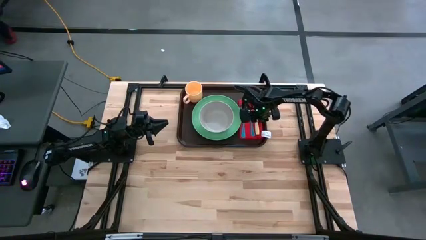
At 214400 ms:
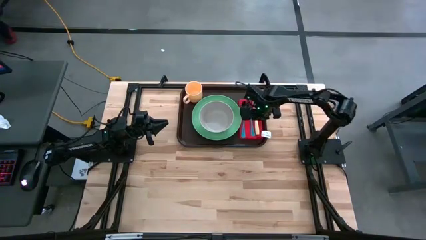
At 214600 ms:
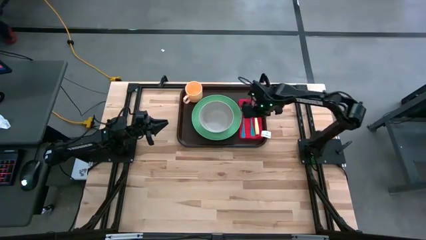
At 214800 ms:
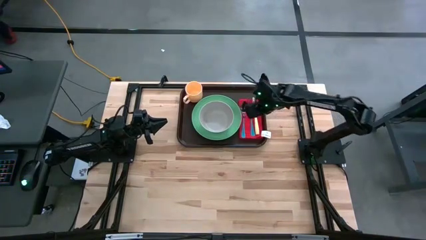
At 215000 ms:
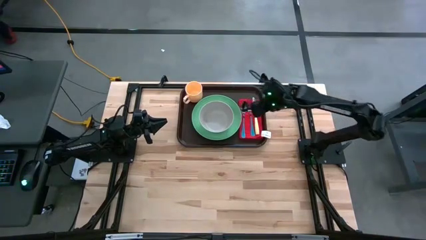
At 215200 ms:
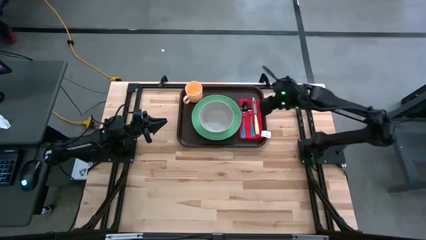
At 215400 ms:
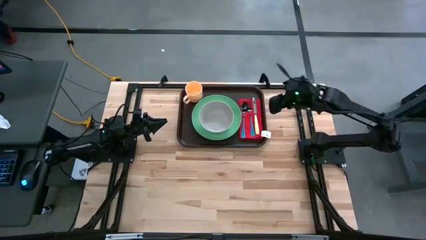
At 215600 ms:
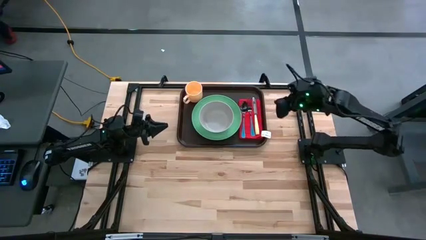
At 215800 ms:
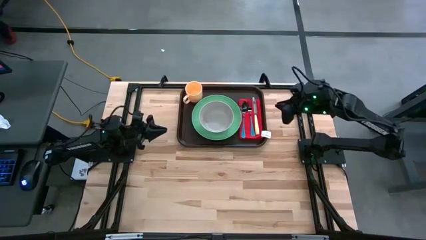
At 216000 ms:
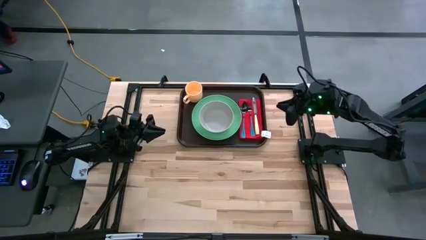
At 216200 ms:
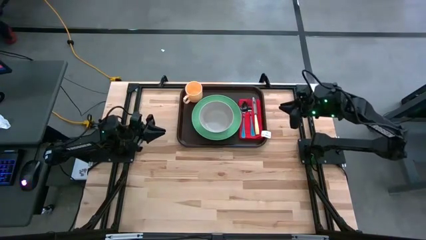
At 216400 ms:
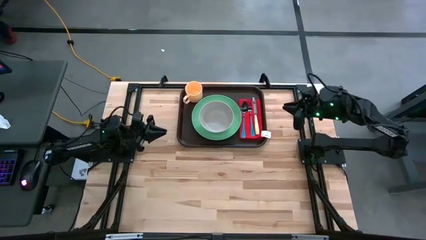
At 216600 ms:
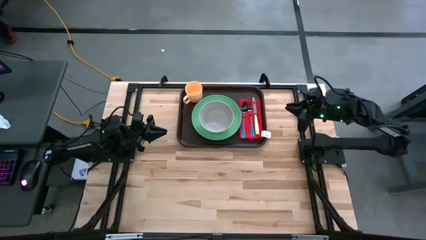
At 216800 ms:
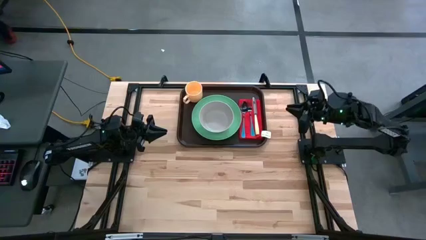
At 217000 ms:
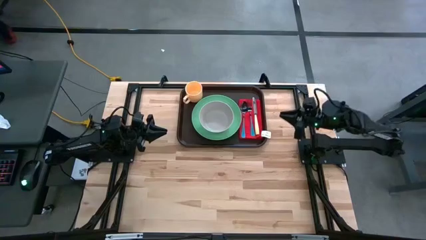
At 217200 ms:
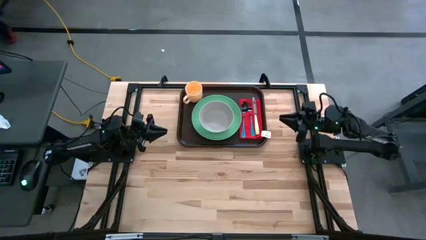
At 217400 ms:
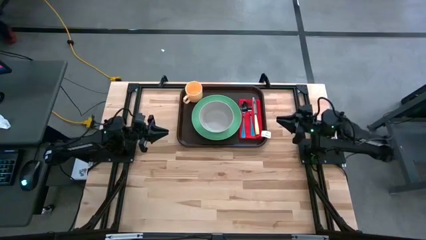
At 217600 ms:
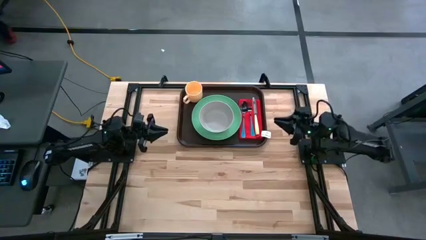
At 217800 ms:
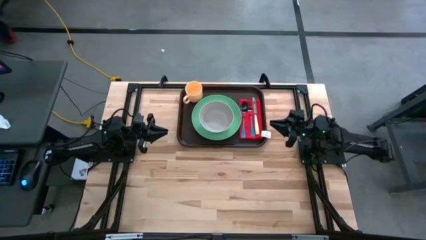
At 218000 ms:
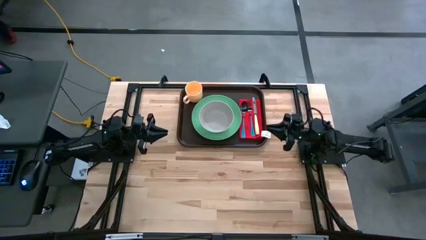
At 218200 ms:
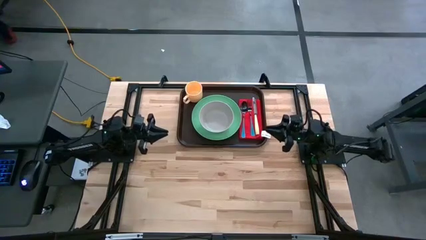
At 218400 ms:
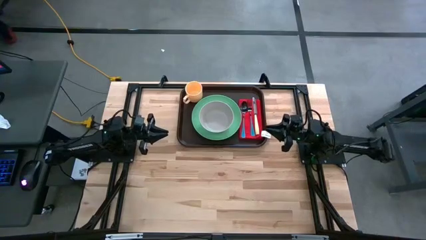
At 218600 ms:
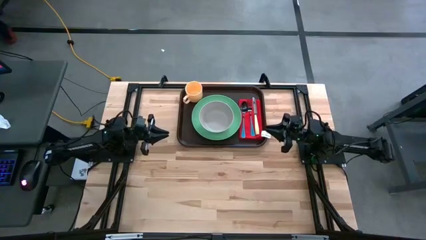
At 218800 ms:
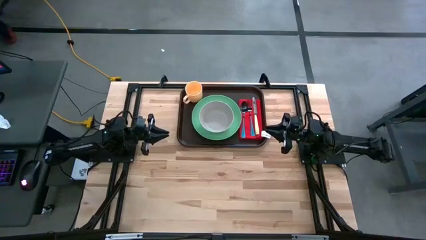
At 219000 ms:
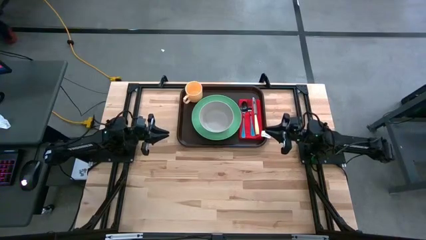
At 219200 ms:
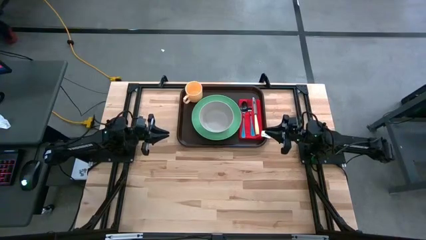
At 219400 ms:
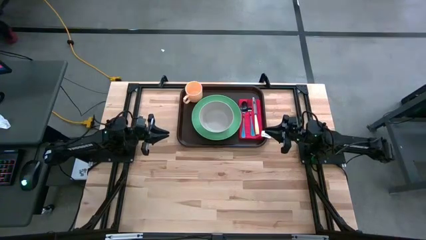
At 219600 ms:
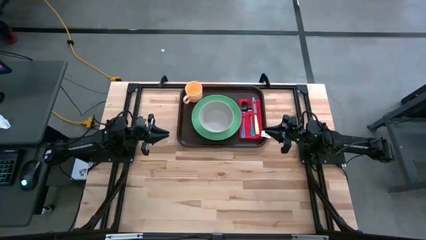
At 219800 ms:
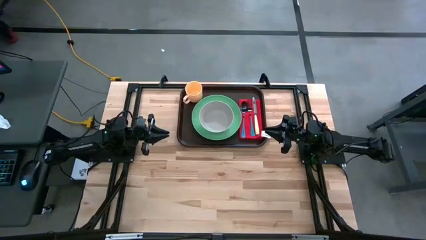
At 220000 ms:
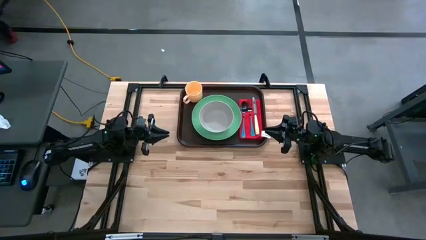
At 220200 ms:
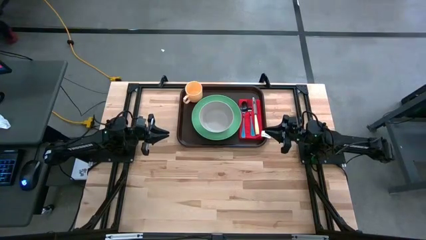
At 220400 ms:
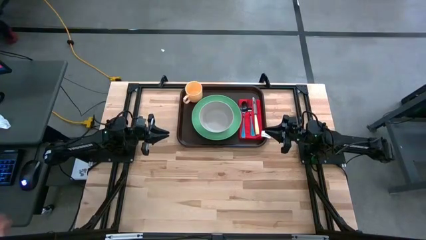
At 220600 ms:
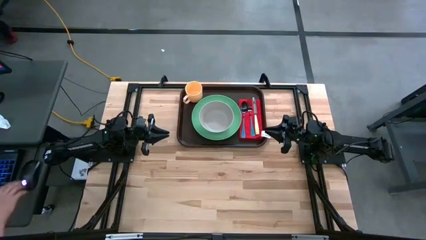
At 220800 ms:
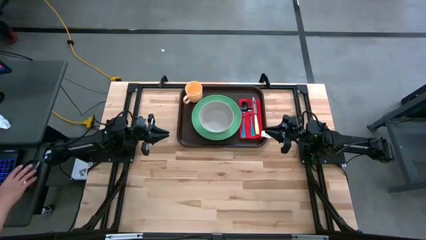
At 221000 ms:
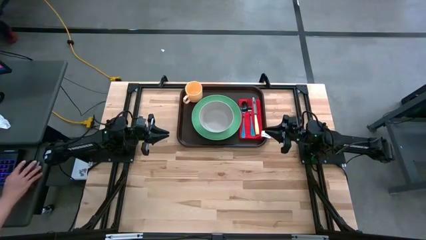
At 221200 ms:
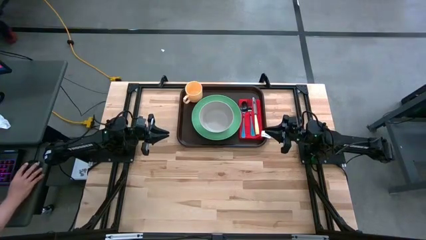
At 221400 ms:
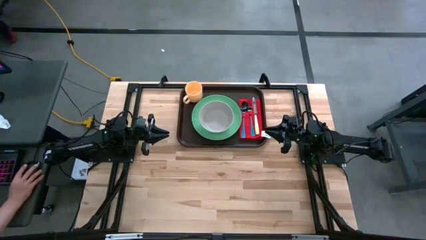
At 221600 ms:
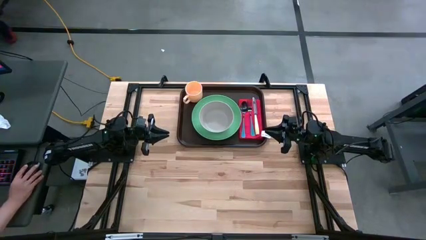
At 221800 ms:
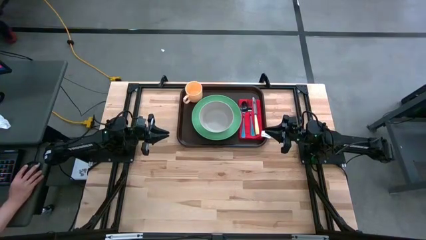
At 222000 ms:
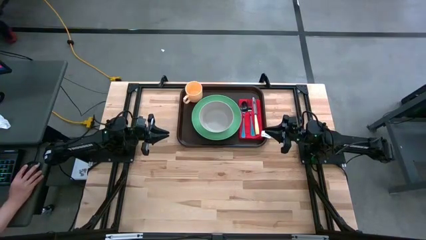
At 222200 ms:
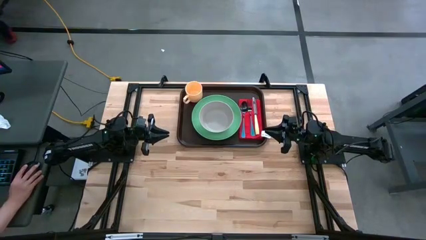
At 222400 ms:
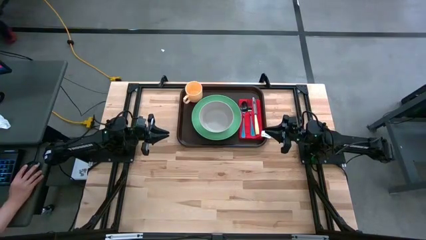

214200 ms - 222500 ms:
Task: Set up tray
Return to Home Position

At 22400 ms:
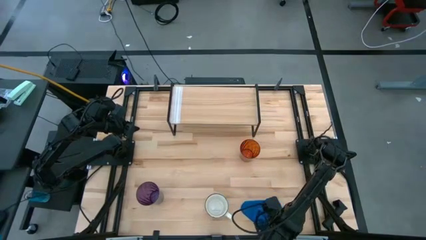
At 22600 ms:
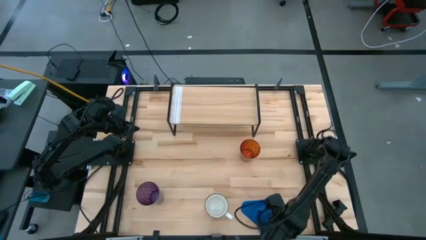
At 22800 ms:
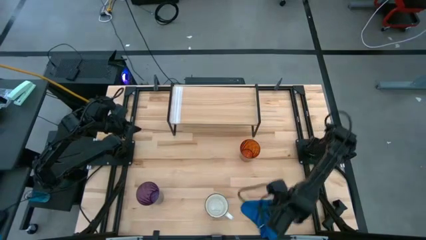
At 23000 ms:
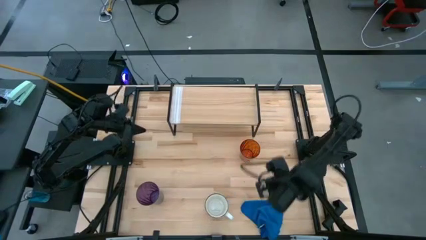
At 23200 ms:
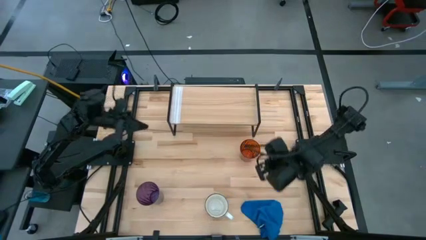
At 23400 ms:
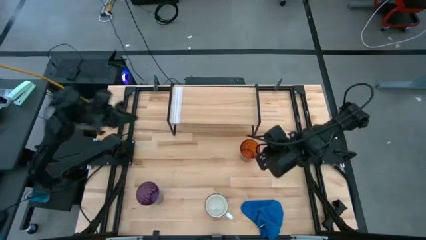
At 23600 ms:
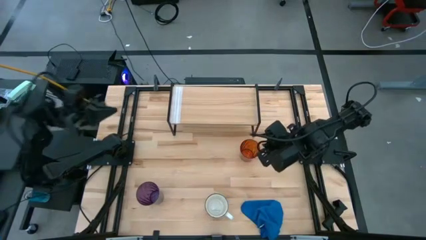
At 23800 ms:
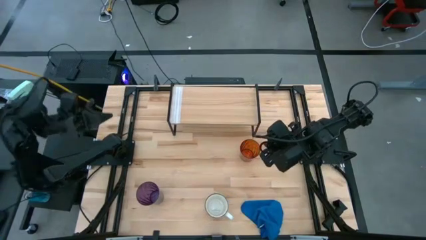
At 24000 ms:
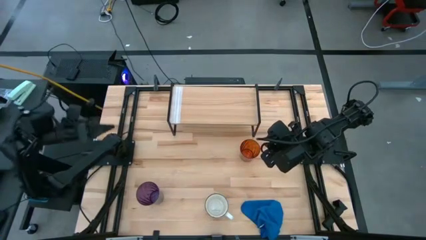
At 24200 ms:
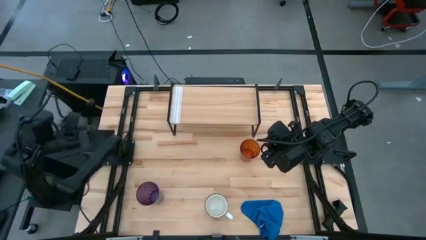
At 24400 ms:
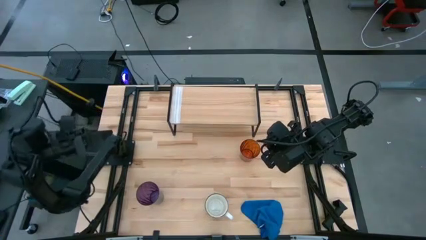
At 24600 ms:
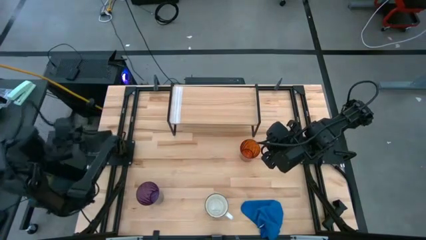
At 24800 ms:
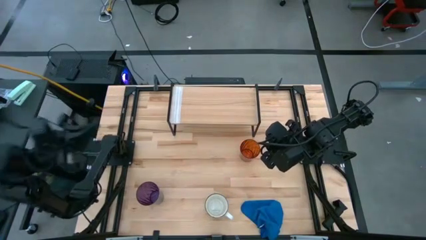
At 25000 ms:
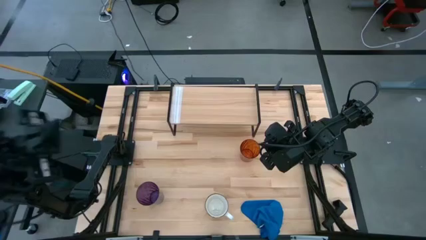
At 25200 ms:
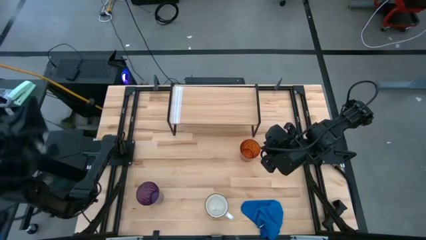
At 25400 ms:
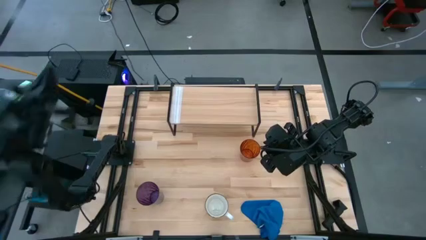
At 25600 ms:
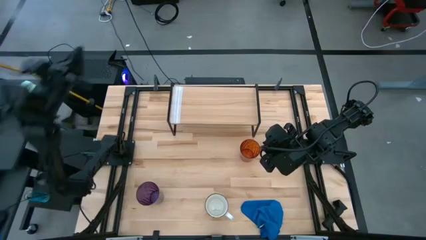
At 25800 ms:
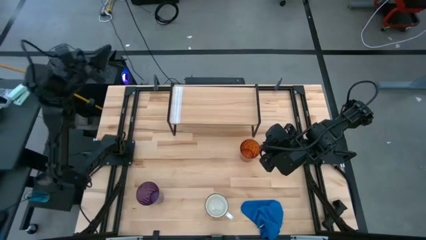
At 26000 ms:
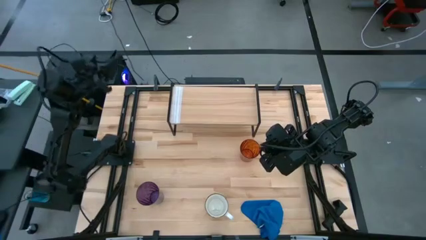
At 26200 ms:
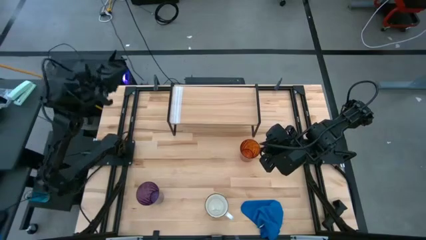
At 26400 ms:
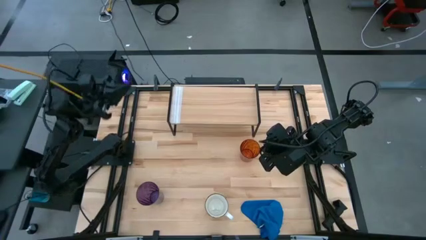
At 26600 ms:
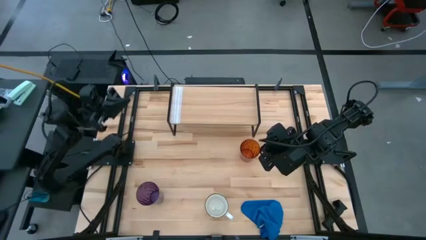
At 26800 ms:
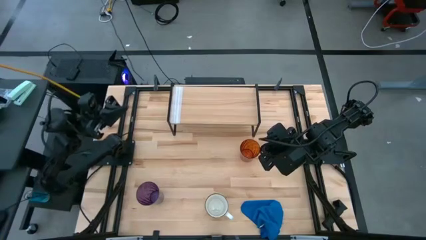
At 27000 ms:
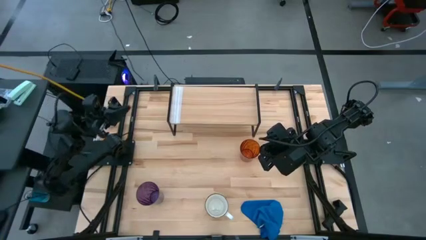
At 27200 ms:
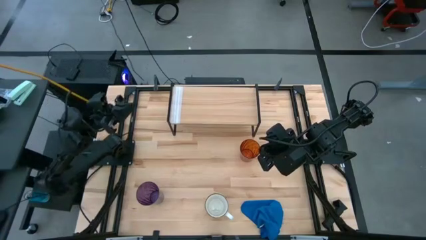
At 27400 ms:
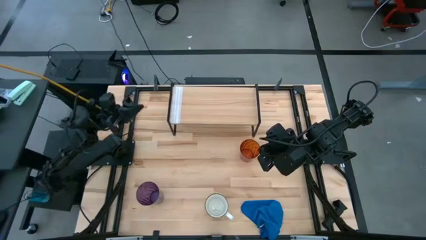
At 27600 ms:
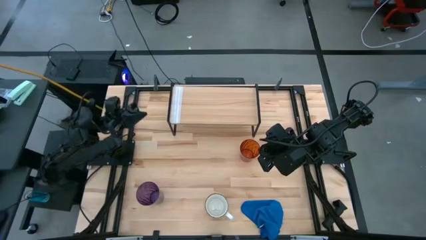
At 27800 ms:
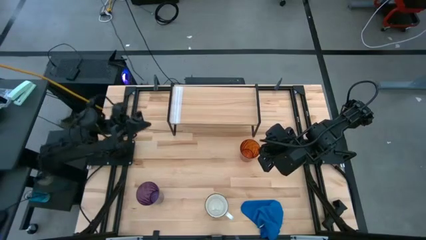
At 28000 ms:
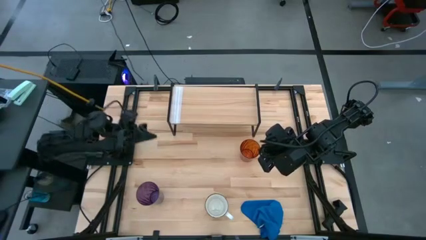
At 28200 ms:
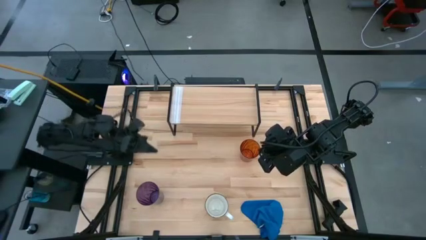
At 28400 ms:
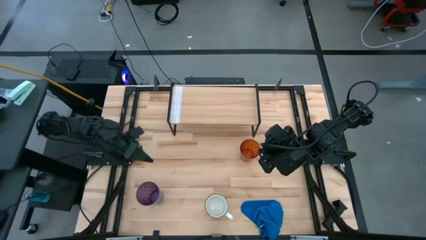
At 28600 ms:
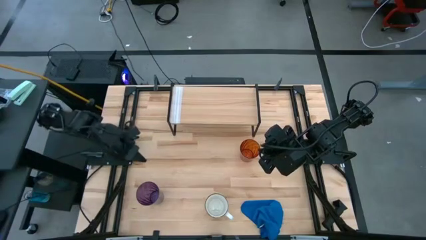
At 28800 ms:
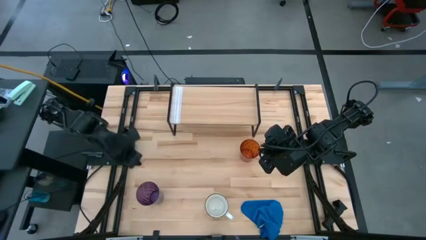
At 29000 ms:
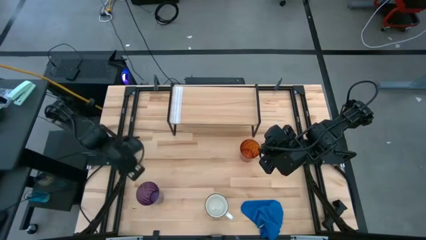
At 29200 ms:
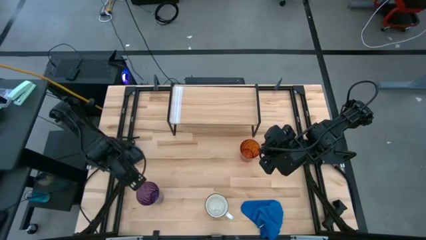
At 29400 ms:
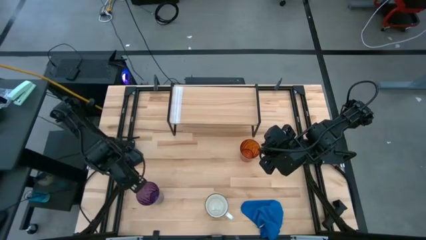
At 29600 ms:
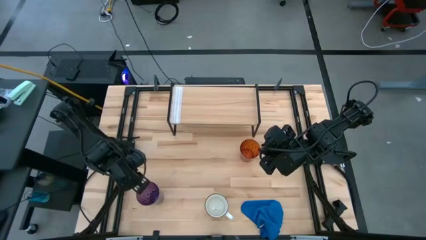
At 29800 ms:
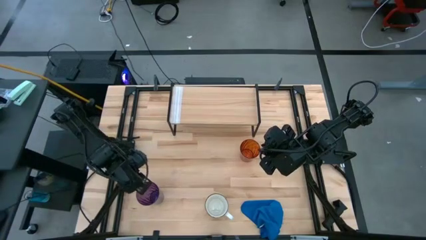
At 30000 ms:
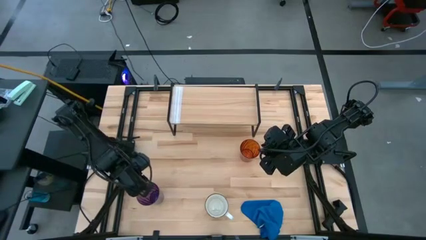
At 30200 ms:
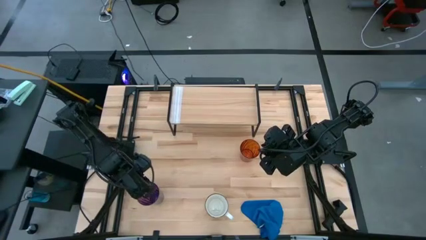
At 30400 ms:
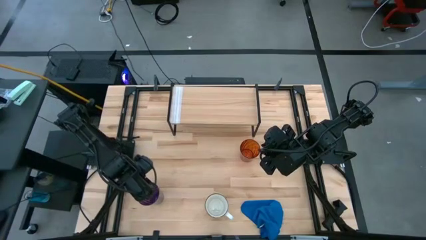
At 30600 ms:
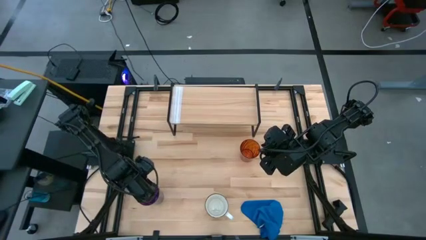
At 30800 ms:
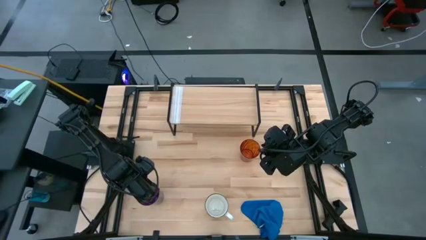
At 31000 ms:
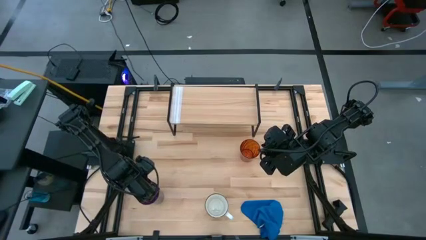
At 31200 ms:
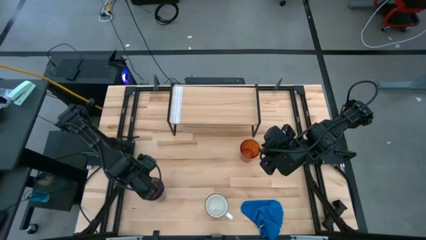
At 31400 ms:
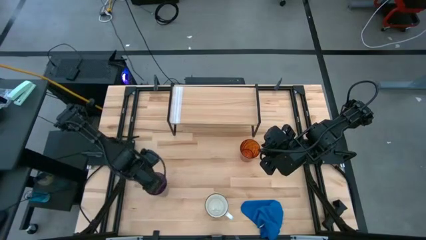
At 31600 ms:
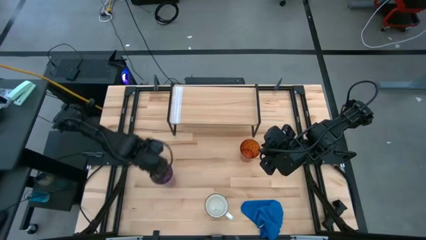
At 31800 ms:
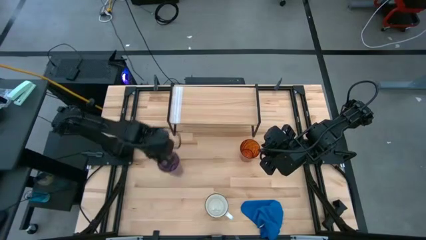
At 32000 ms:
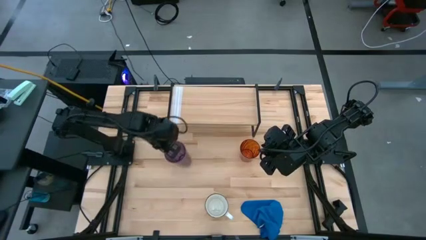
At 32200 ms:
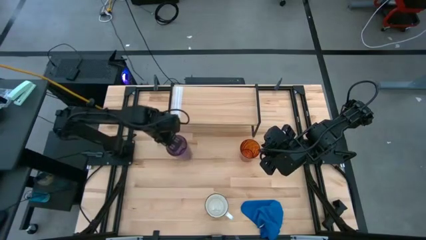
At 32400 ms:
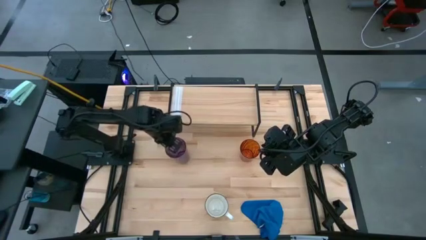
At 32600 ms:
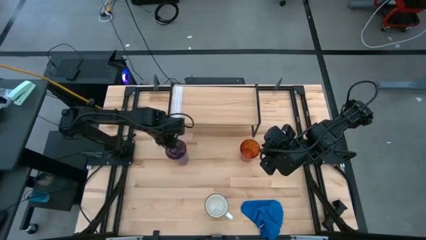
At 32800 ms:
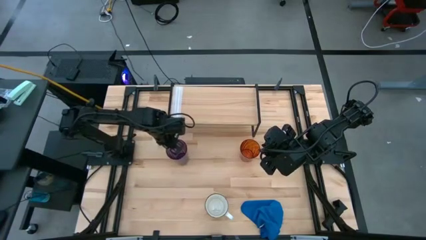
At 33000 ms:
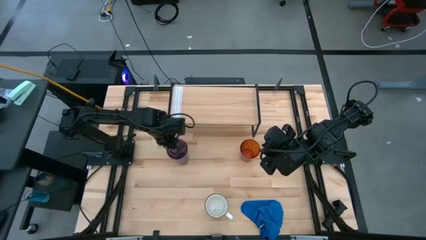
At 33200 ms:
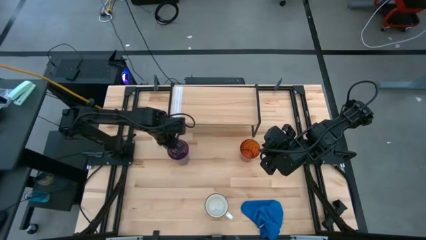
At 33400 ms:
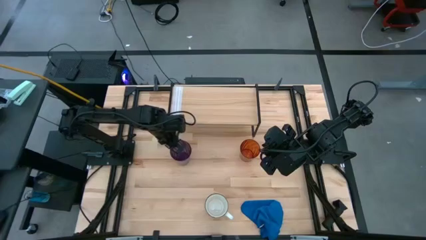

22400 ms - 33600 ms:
Task: Stack small to large cups/mugs on shelf
Prepare the purple glass
